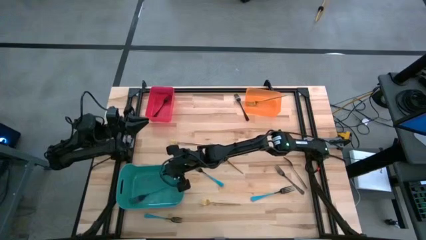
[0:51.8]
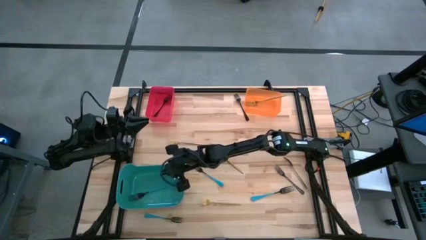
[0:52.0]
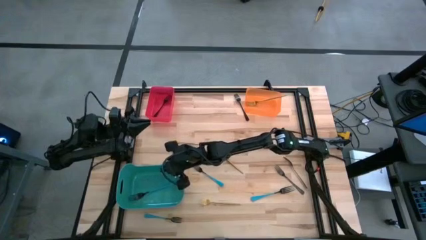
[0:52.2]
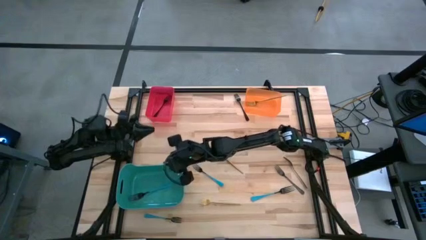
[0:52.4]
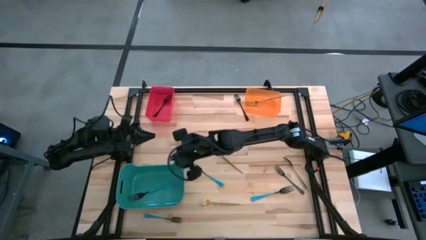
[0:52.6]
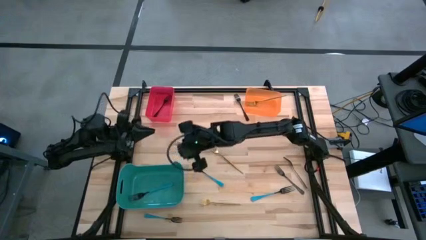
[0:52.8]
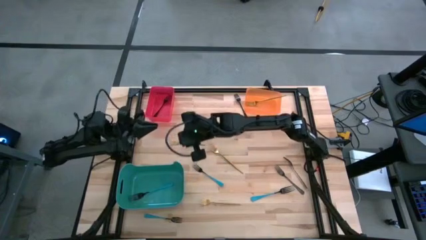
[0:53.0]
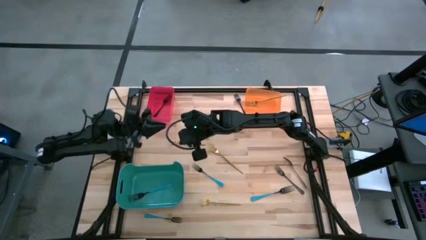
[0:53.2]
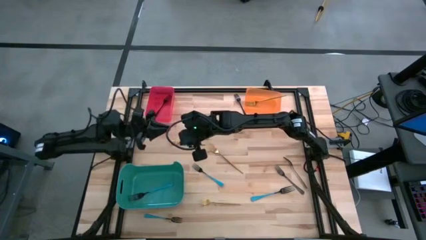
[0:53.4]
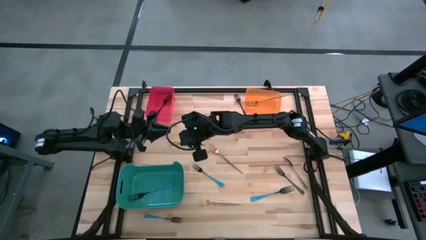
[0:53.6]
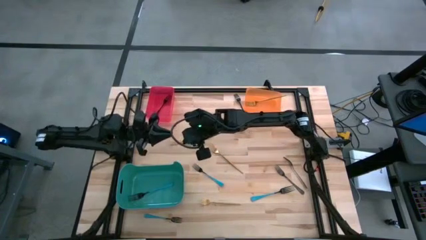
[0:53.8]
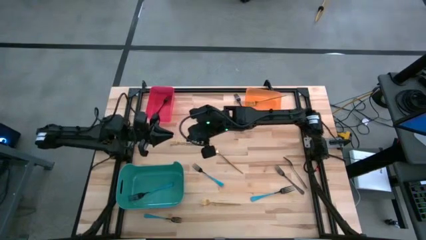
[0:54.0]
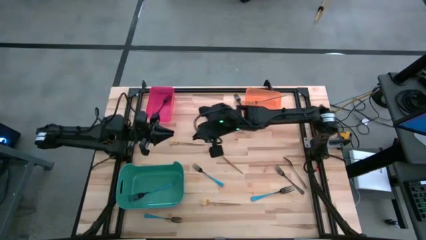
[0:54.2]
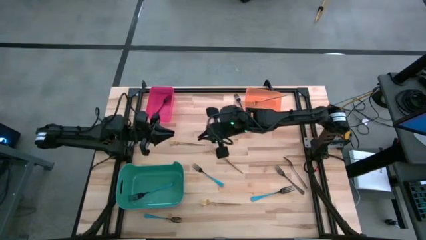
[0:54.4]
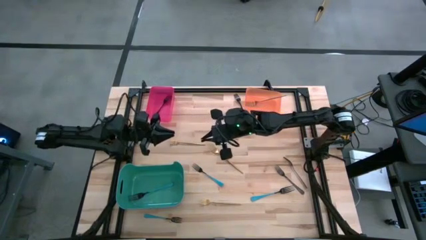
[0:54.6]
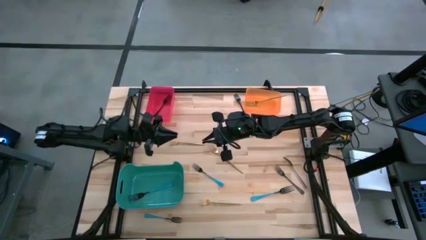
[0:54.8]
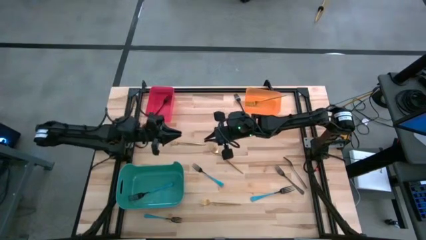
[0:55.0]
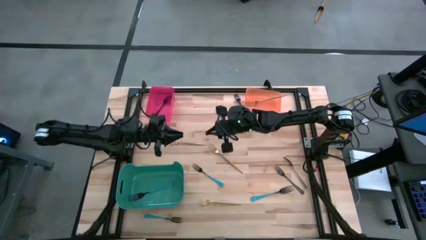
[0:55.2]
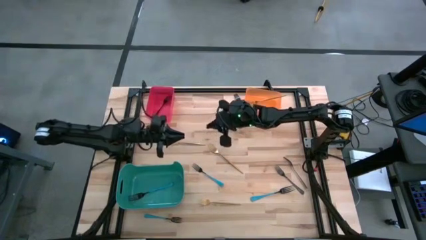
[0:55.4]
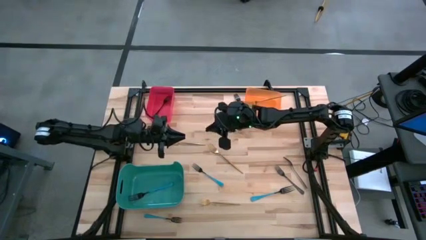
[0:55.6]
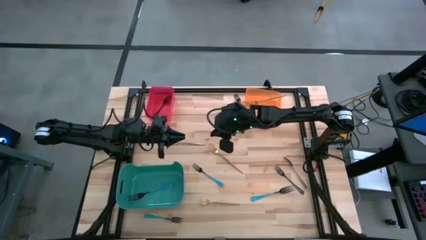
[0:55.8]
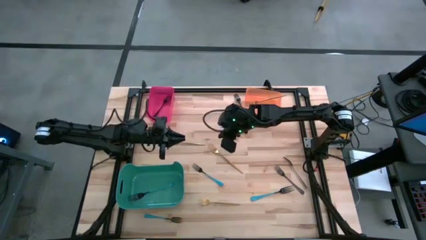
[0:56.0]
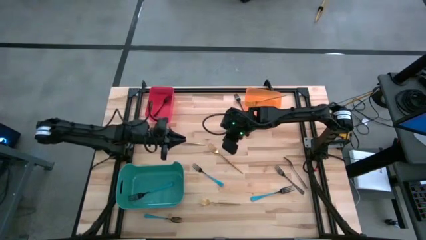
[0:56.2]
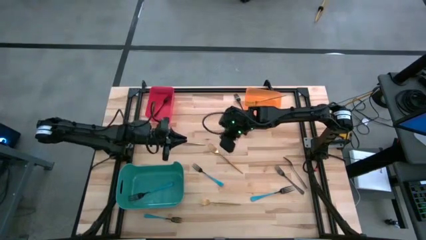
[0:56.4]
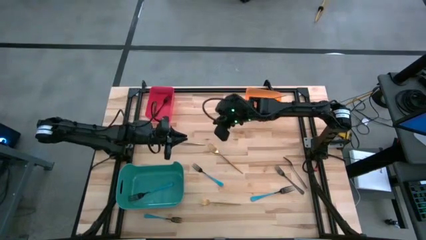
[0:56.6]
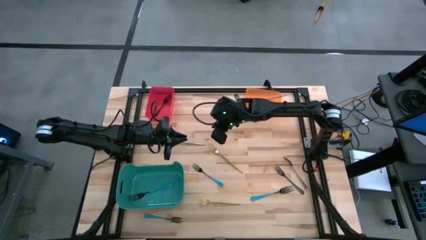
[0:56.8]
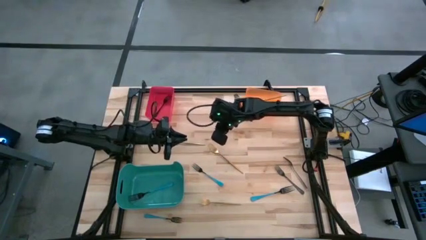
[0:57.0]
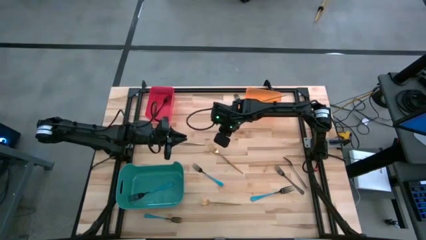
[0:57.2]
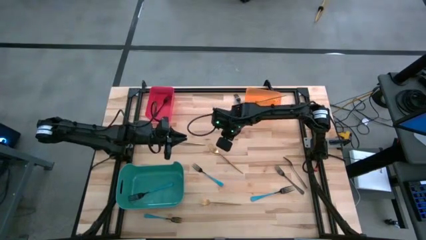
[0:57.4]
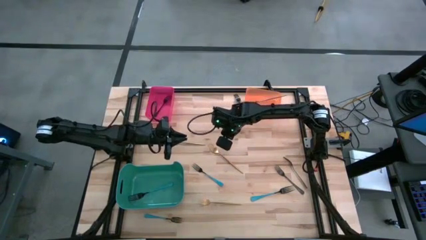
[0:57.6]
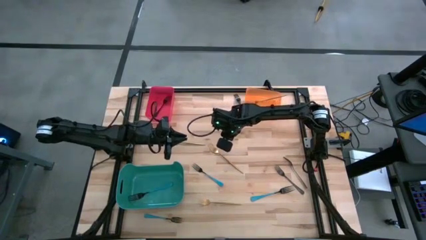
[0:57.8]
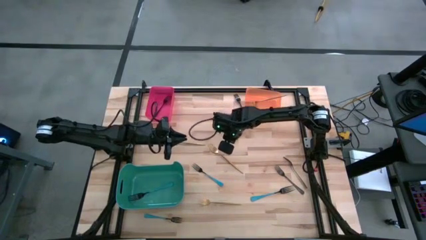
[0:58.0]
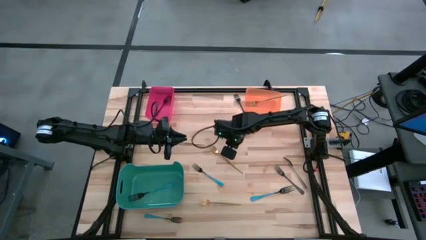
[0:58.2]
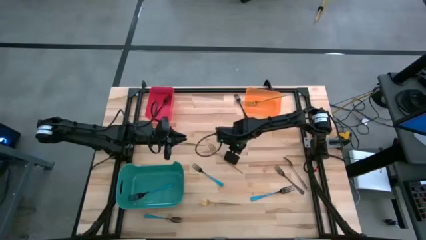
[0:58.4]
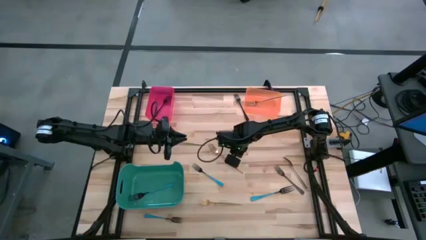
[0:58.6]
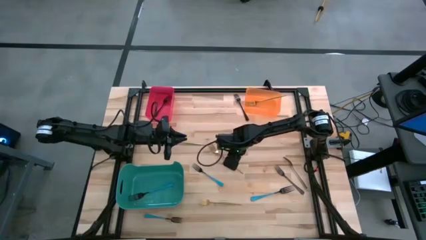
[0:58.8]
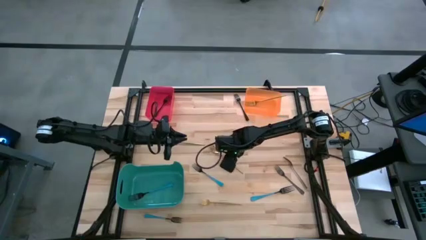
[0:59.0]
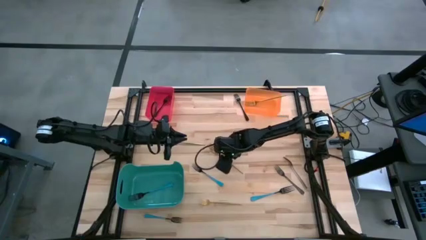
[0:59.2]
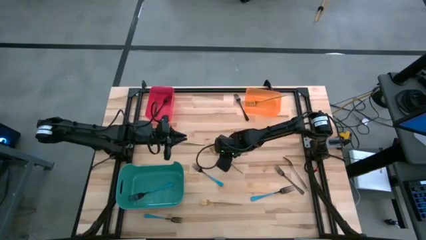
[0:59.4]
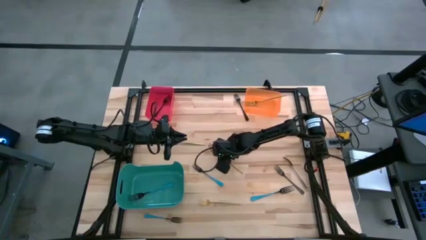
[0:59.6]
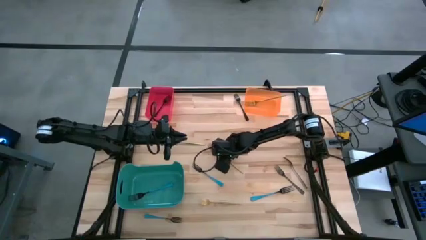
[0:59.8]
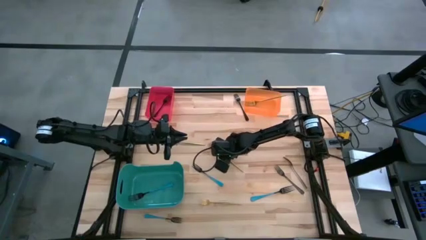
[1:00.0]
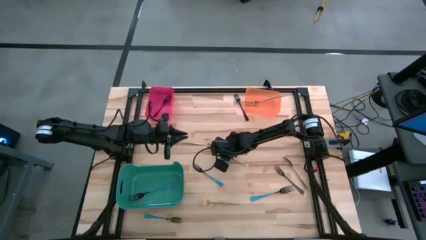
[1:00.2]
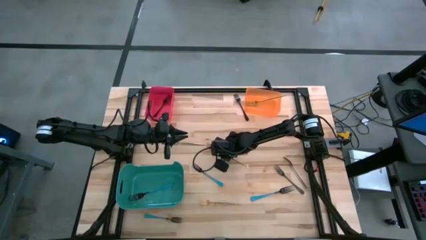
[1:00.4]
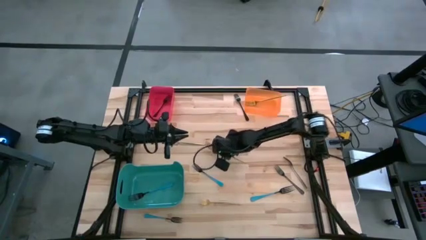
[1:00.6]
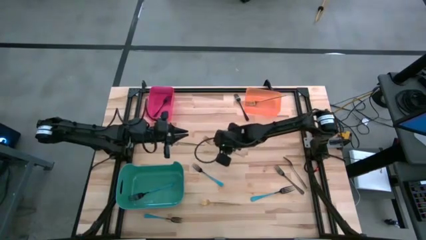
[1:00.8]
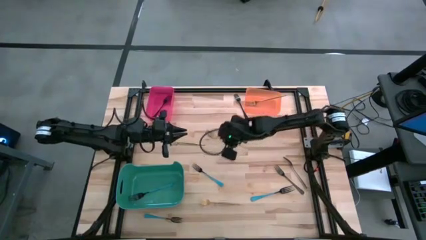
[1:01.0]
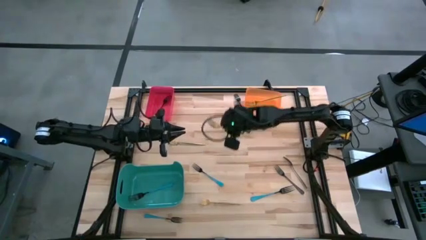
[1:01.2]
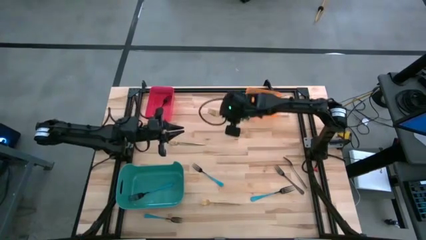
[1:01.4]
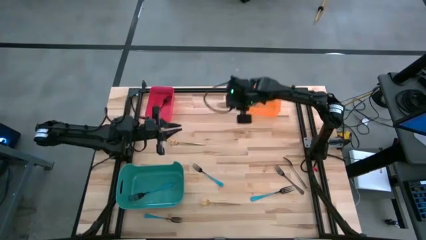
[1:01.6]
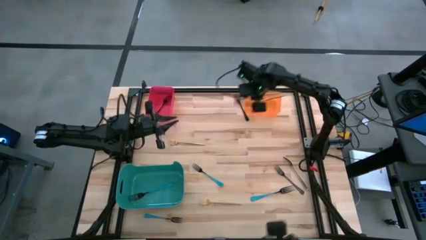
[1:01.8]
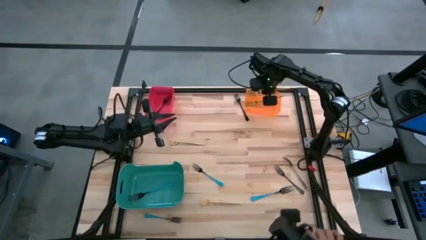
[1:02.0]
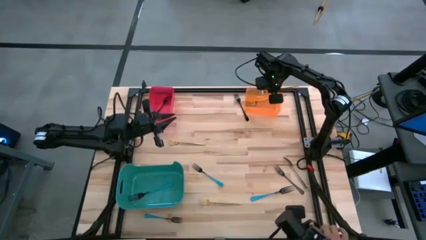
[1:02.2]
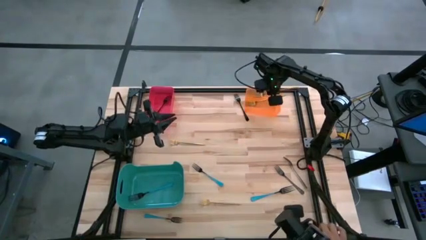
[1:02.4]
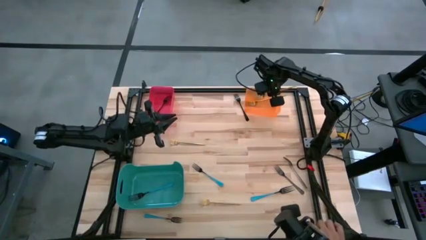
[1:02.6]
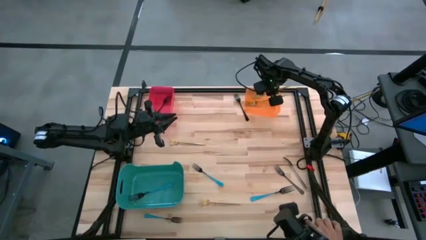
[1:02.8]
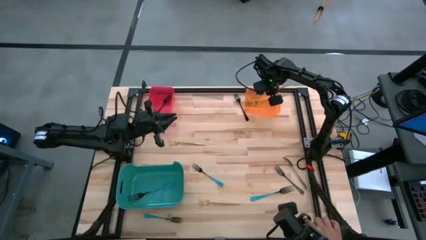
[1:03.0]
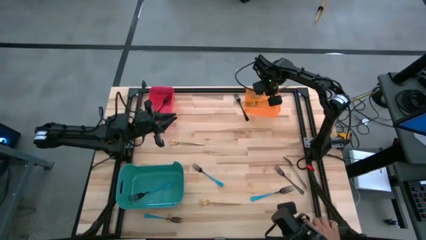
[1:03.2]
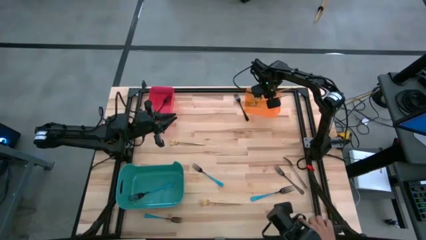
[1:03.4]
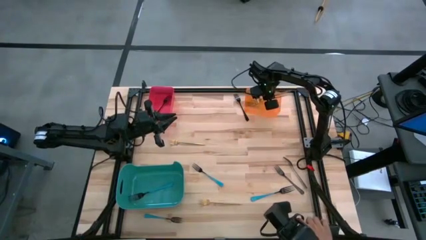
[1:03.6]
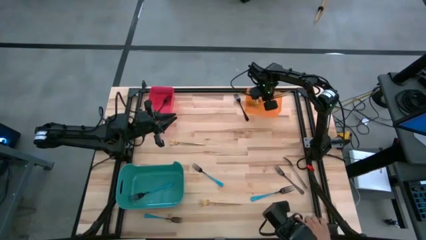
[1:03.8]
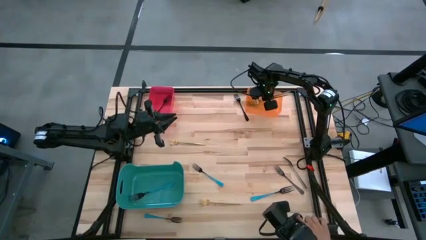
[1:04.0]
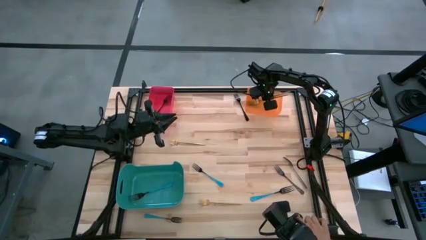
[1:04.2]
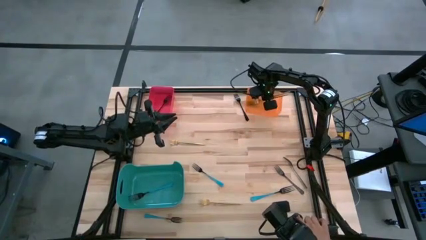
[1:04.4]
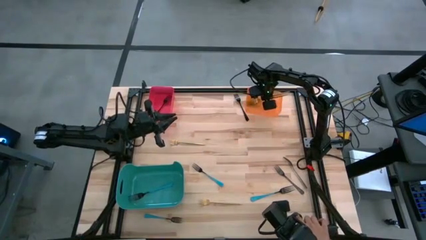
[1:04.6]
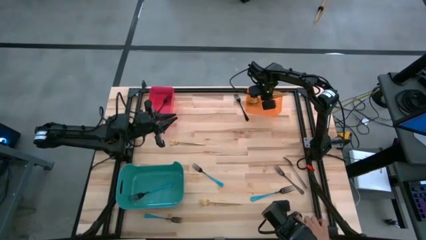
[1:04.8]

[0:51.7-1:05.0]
Task: Sort silverware by color (type)
Put the gold fork into the orange bin
